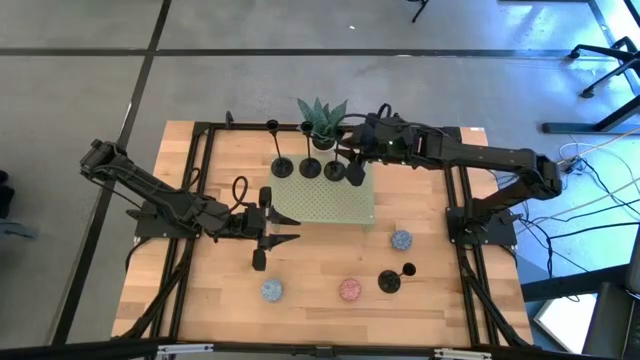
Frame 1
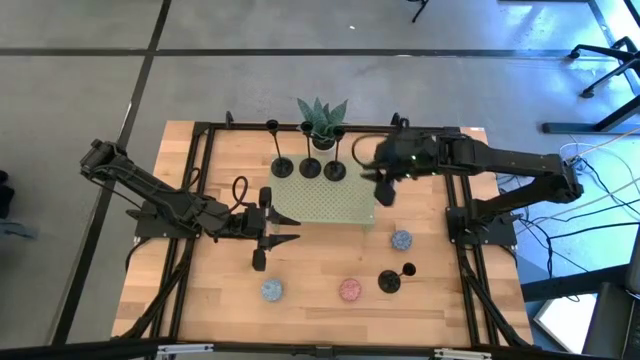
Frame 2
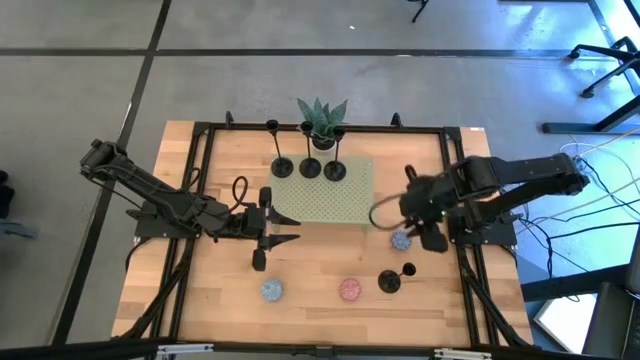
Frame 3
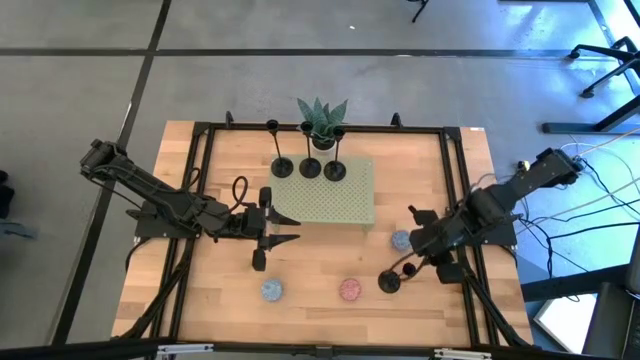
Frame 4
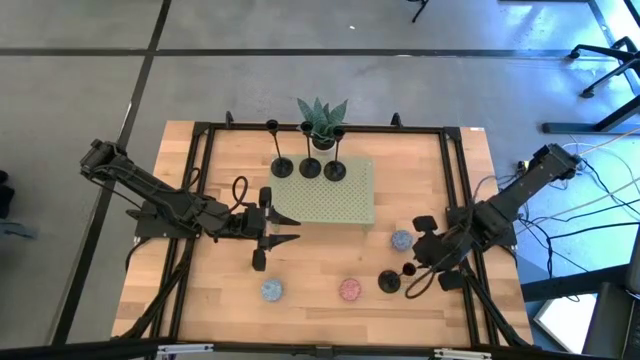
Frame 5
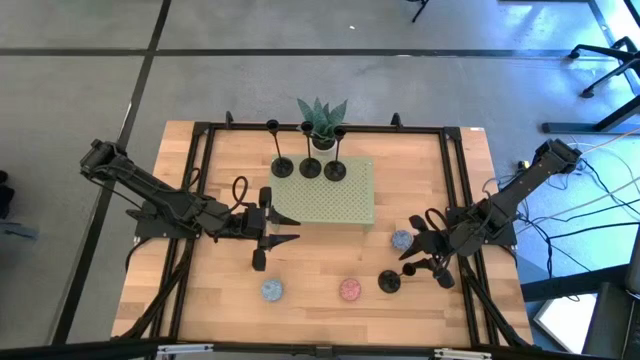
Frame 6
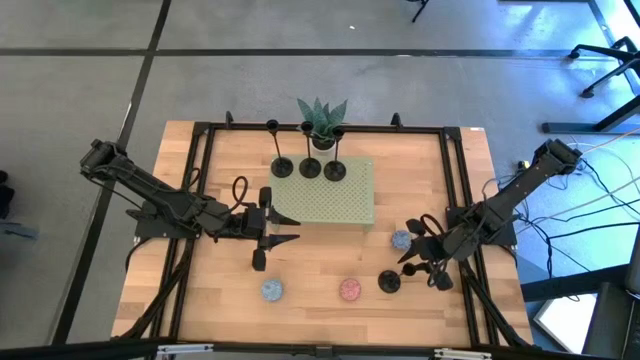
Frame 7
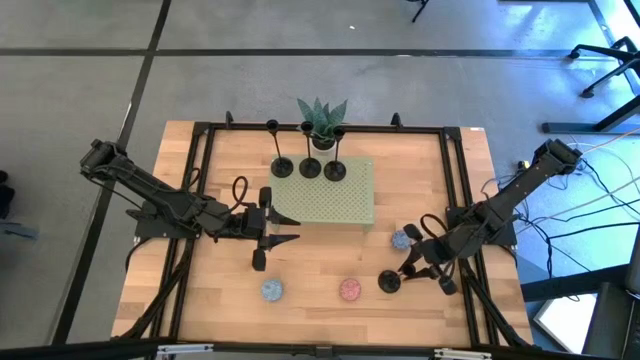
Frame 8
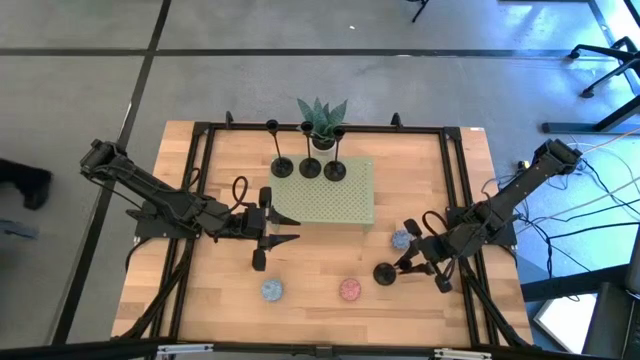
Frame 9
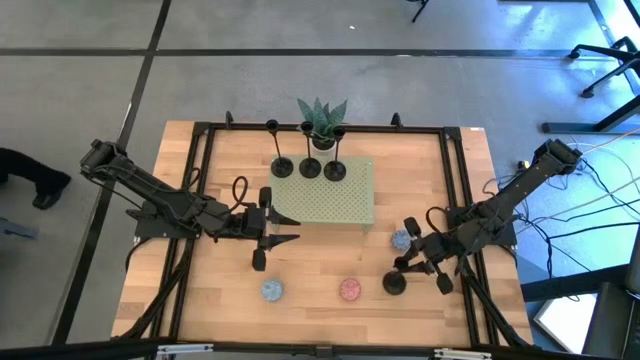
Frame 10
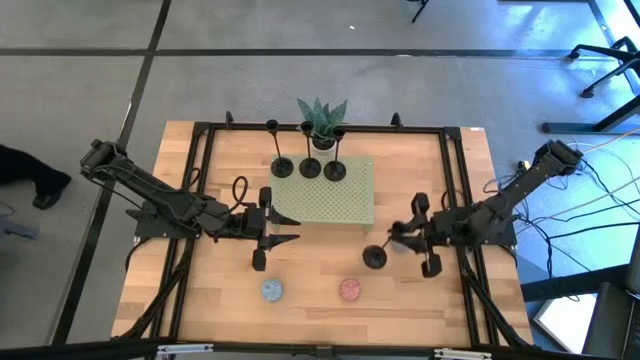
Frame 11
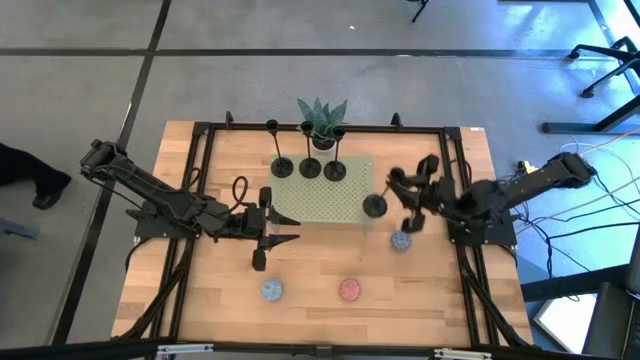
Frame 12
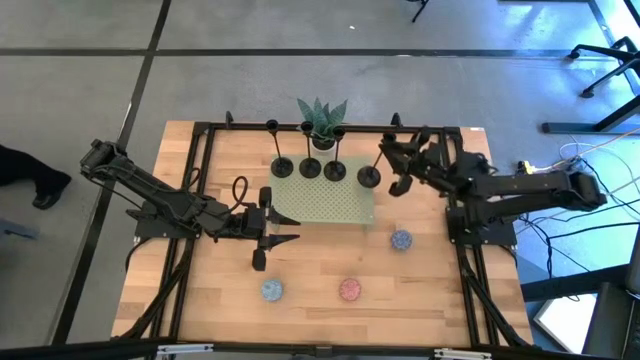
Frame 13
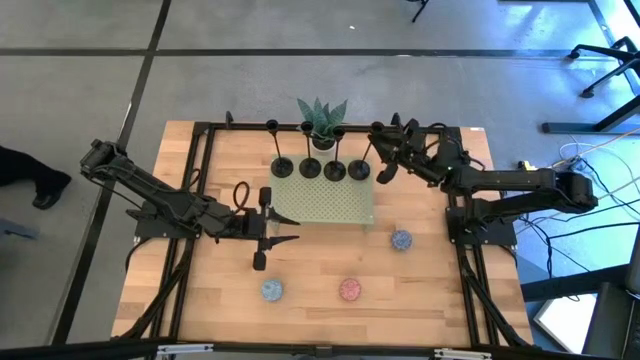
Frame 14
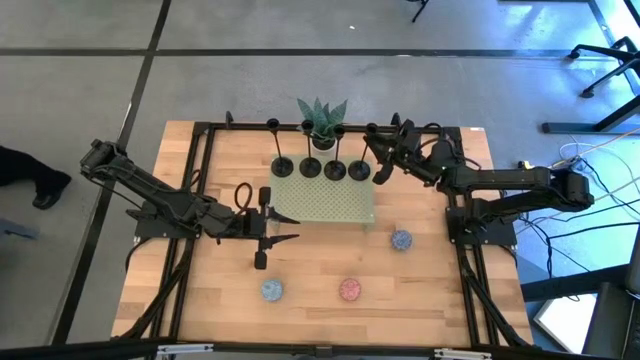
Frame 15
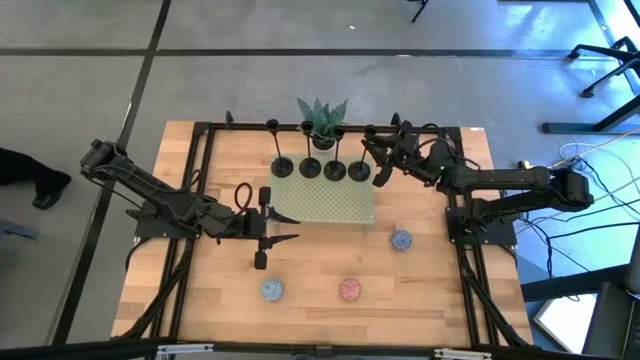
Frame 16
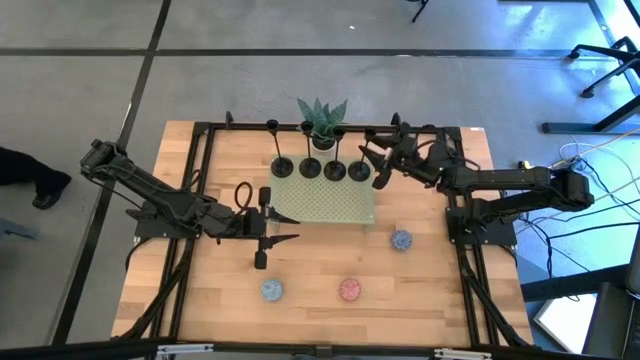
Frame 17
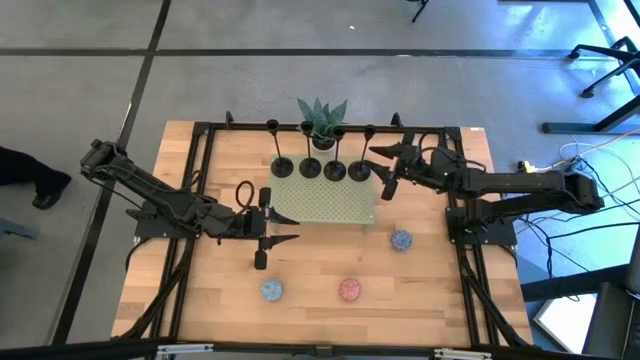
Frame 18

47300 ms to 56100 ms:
Task: Pick & Place candle stick holders
Put the black candle holder on the shelf

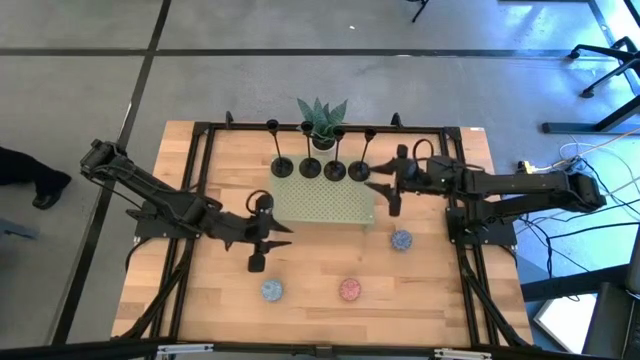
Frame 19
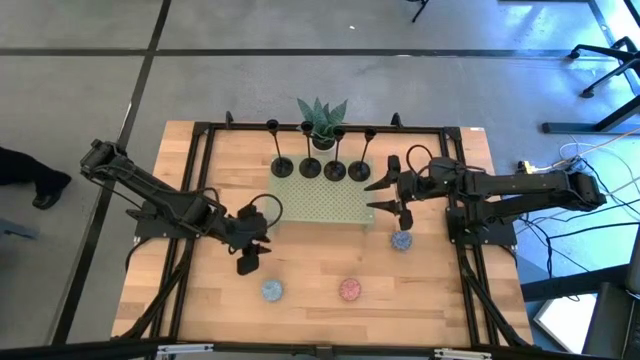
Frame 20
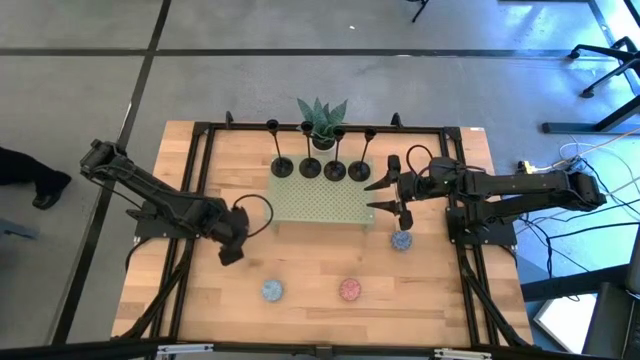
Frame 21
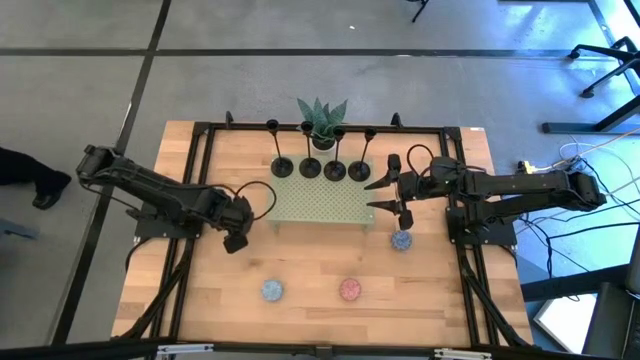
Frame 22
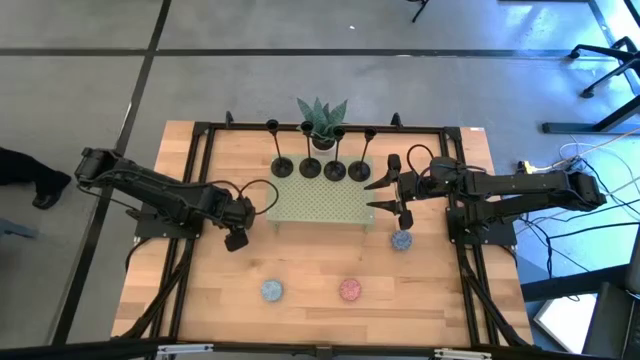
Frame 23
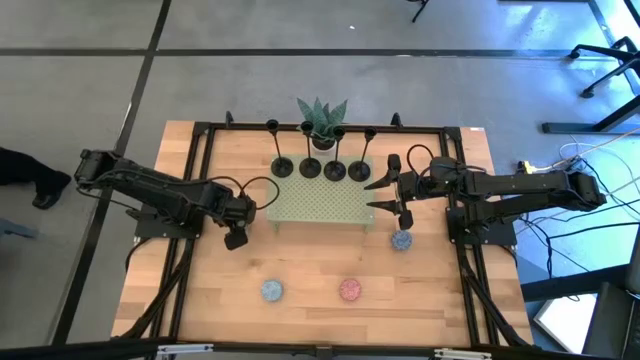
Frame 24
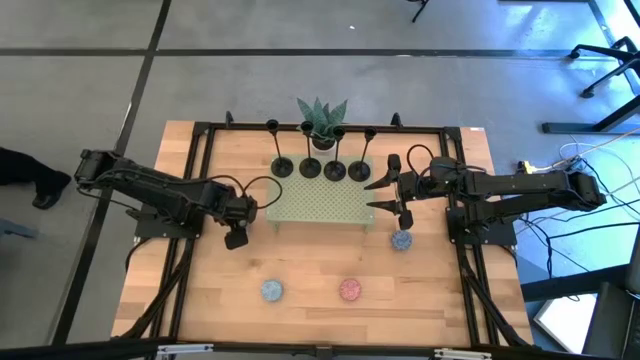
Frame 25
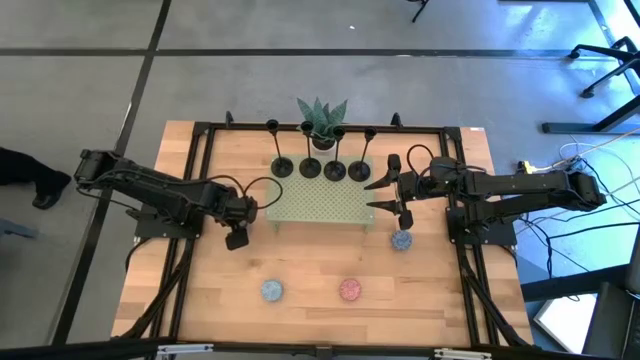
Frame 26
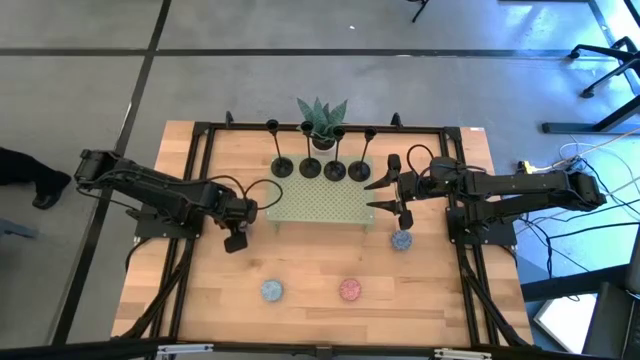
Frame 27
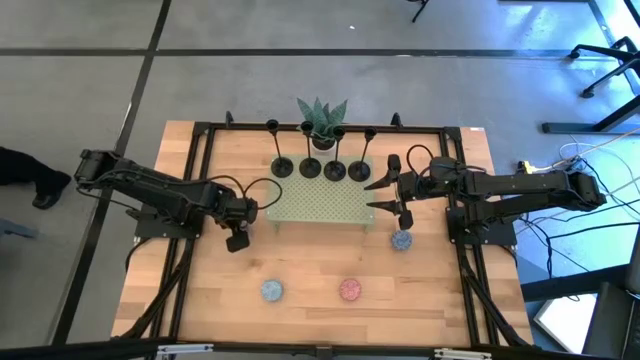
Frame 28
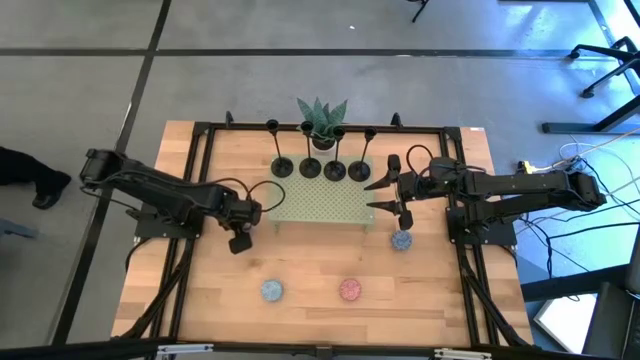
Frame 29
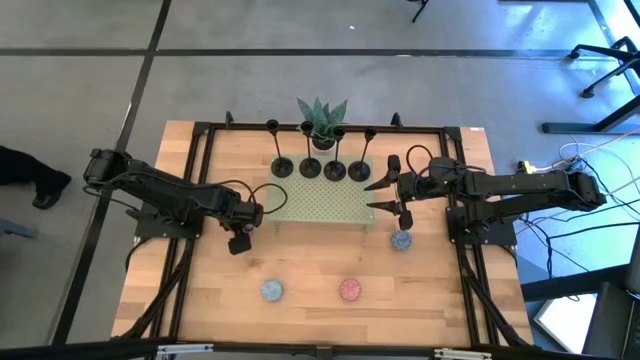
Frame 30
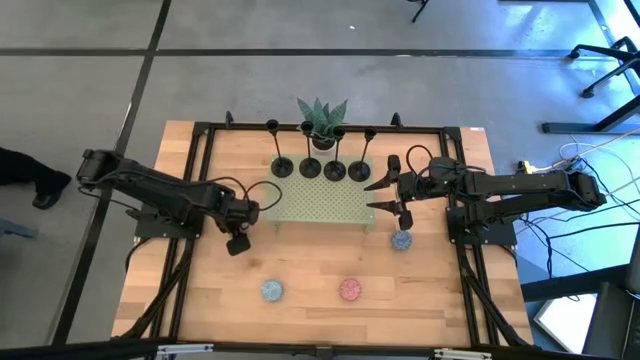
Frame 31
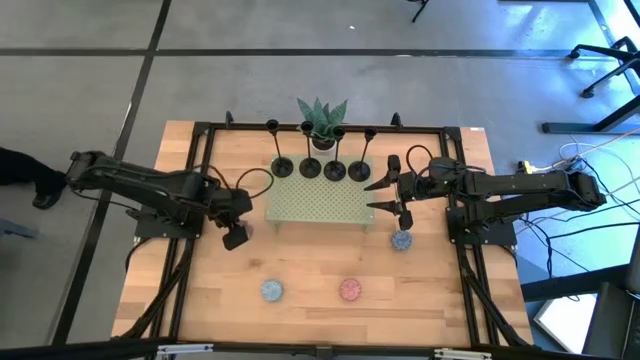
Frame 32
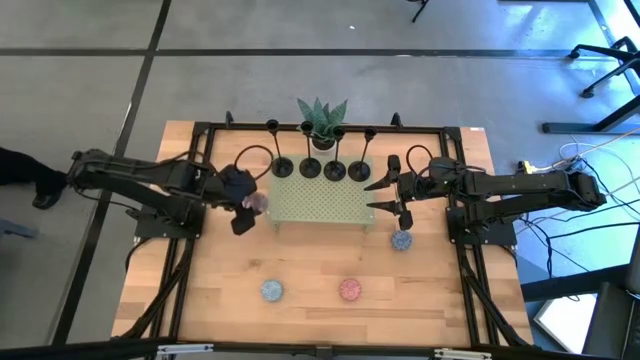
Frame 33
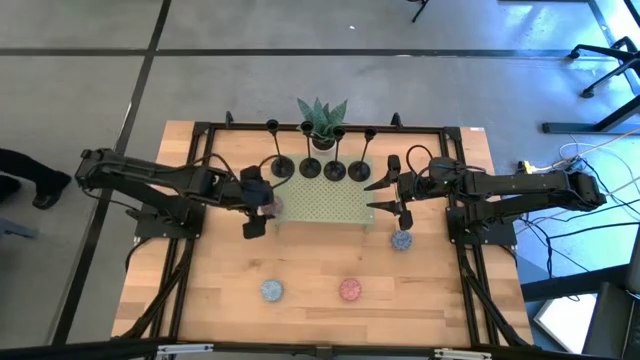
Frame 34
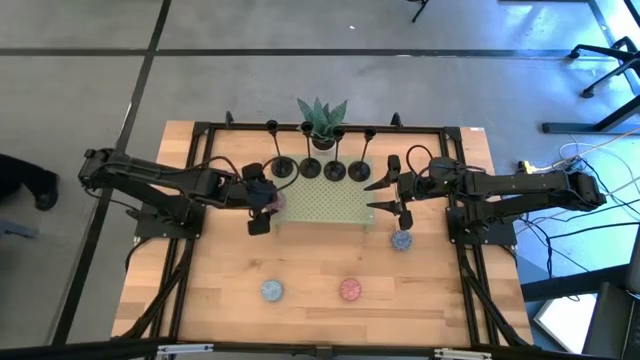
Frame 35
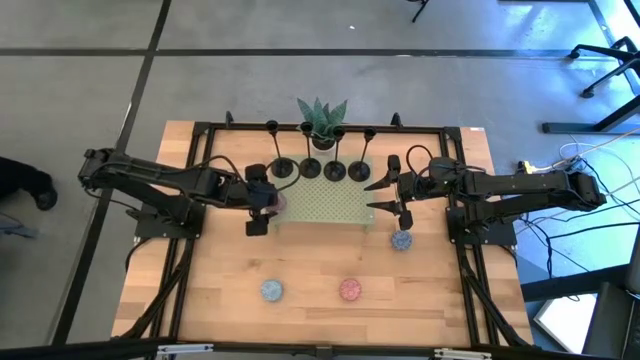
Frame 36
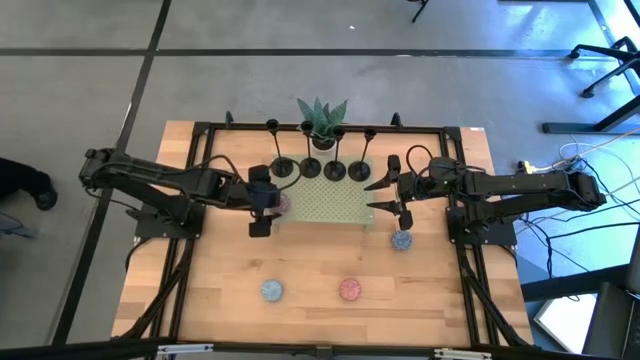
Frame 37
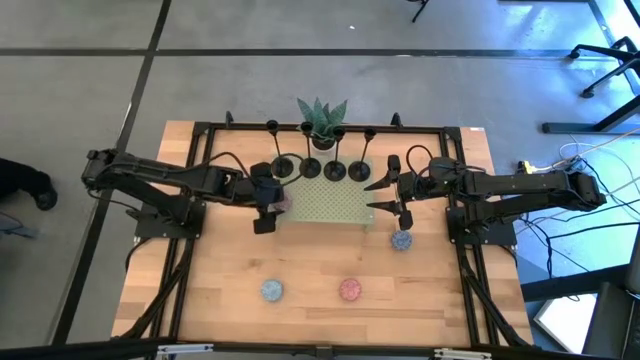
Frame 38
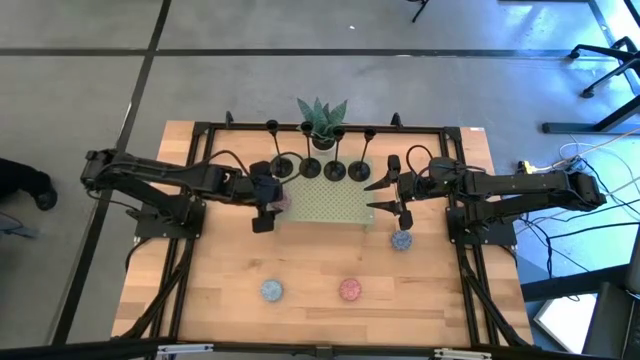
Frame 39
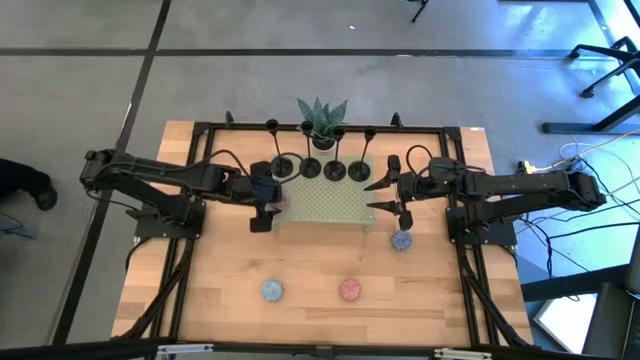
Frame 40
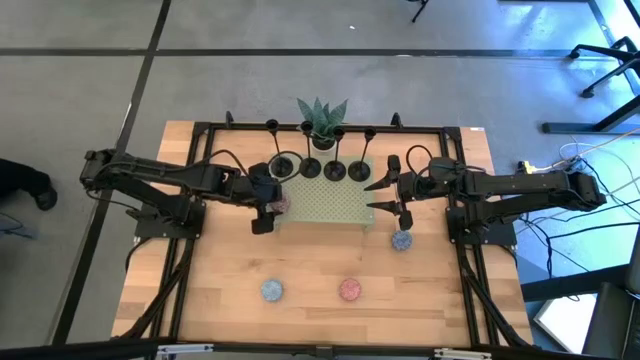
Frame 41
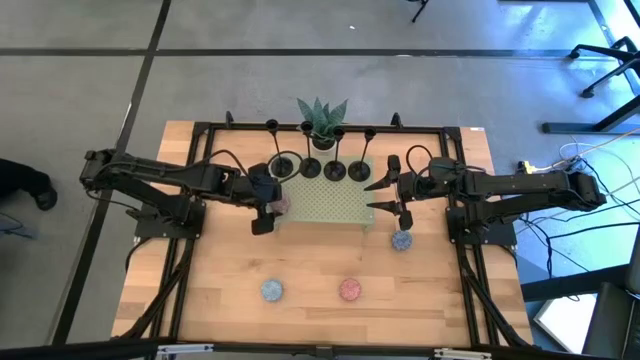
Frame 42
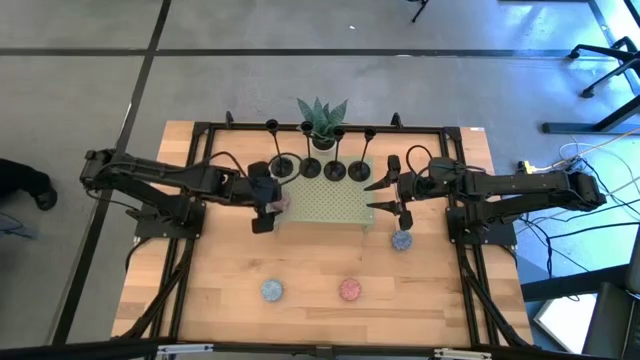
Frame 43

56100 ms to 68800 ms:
Put the red scented candle on the shelf
